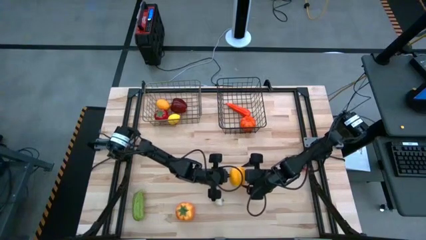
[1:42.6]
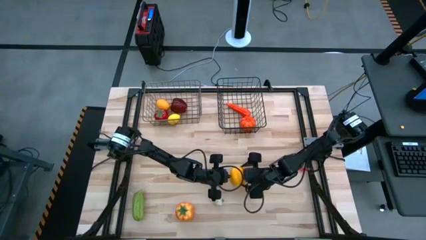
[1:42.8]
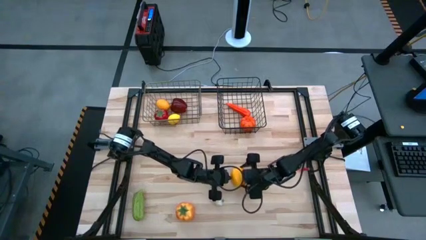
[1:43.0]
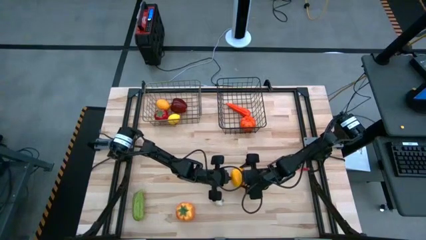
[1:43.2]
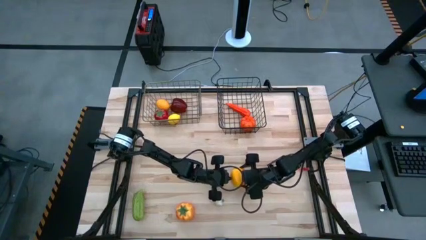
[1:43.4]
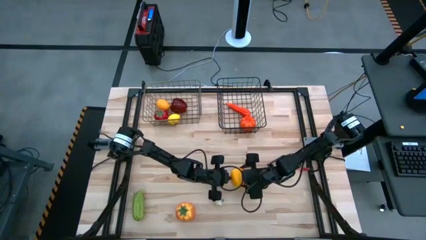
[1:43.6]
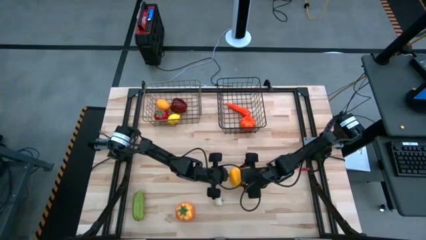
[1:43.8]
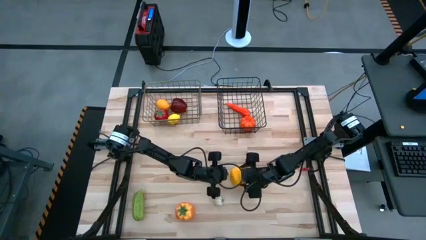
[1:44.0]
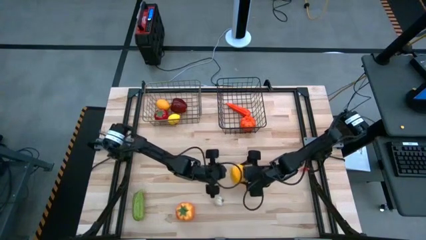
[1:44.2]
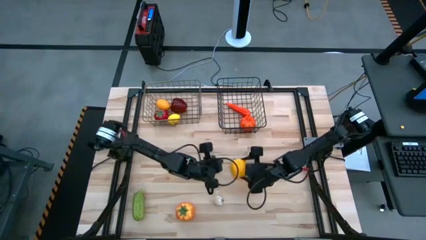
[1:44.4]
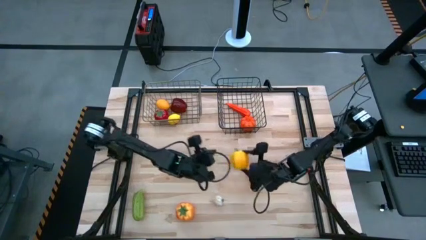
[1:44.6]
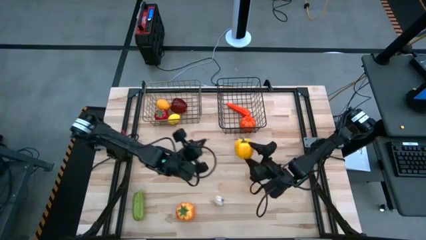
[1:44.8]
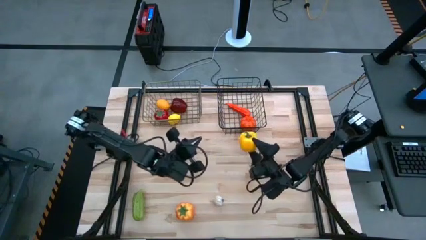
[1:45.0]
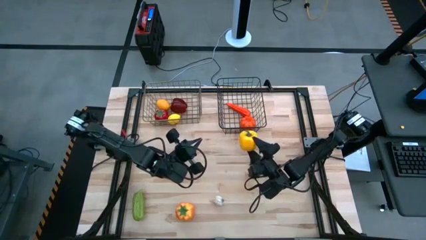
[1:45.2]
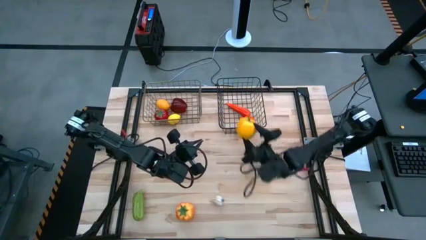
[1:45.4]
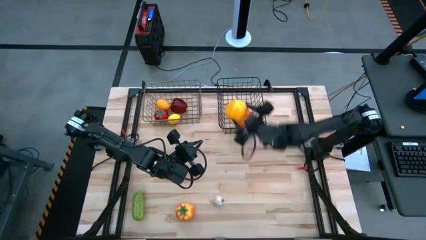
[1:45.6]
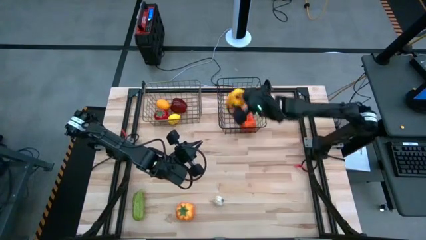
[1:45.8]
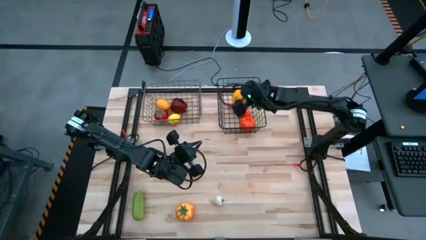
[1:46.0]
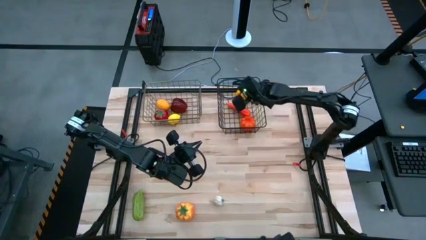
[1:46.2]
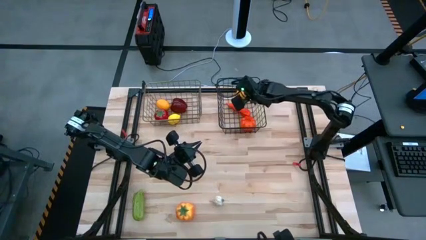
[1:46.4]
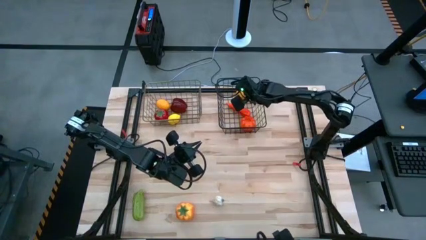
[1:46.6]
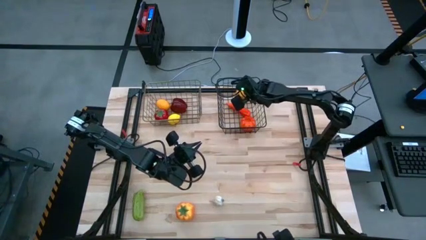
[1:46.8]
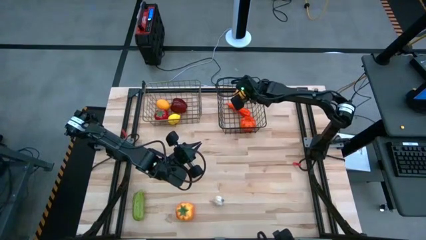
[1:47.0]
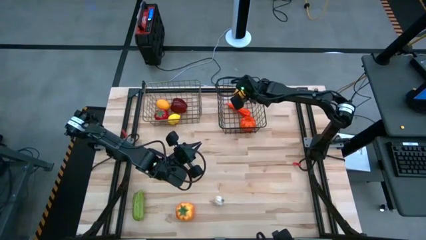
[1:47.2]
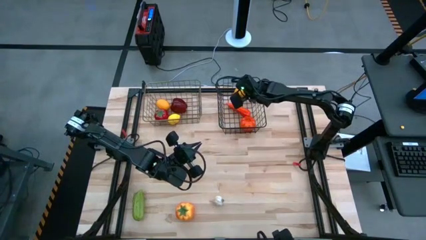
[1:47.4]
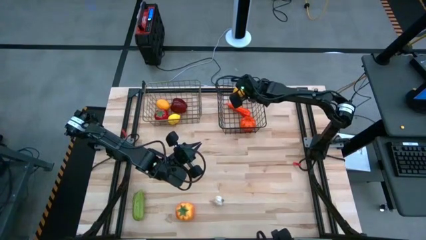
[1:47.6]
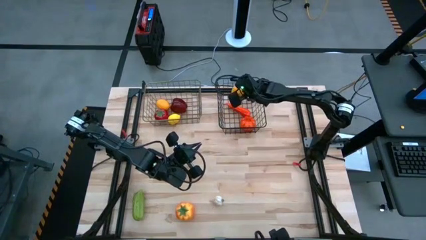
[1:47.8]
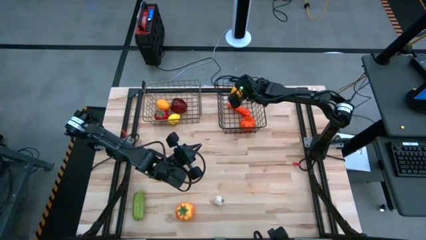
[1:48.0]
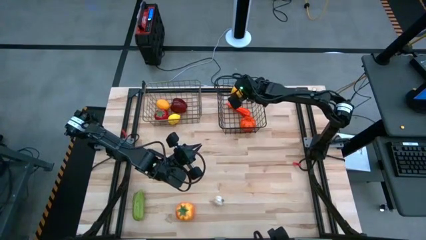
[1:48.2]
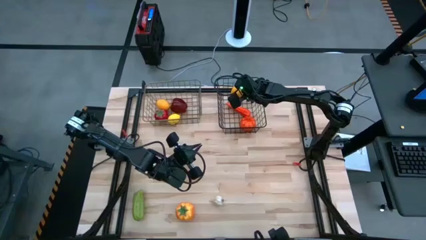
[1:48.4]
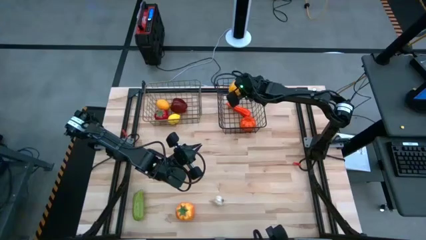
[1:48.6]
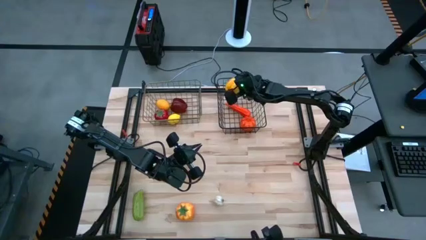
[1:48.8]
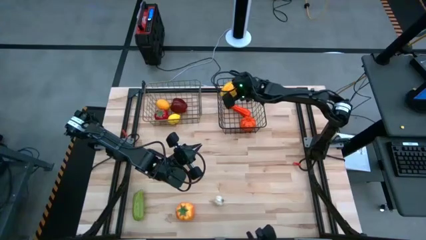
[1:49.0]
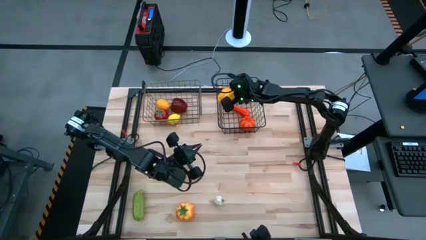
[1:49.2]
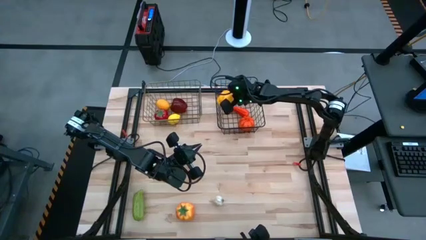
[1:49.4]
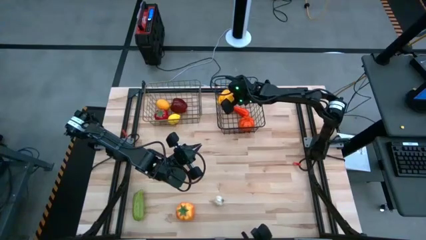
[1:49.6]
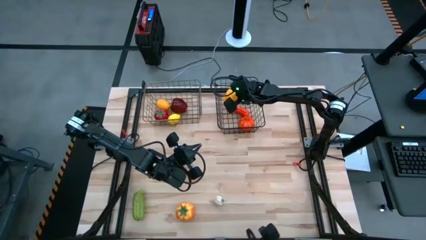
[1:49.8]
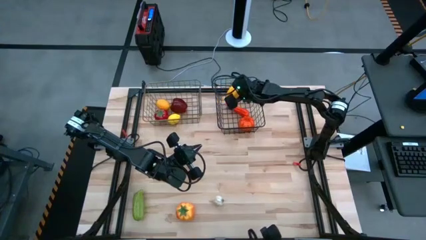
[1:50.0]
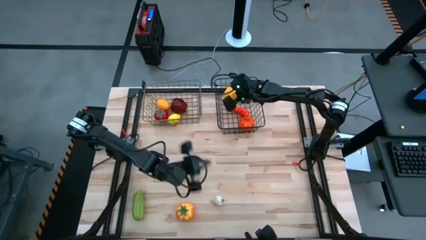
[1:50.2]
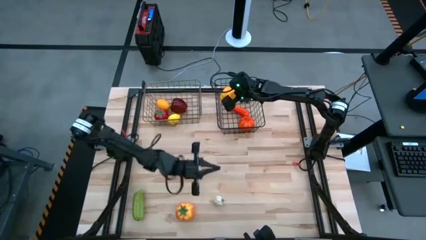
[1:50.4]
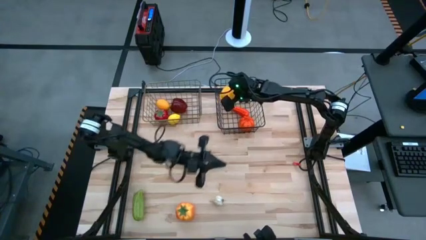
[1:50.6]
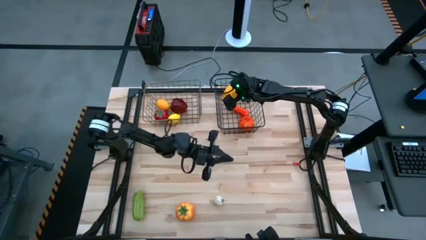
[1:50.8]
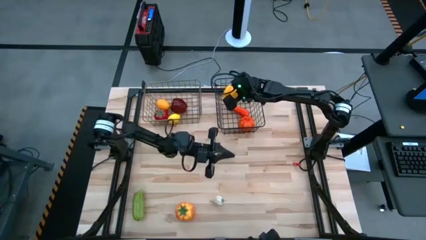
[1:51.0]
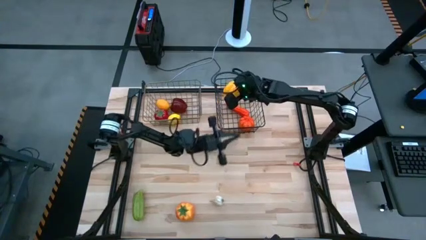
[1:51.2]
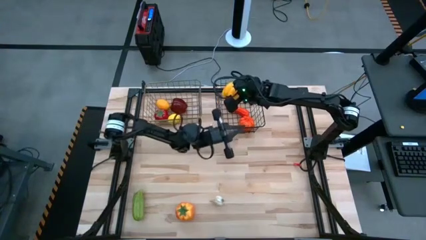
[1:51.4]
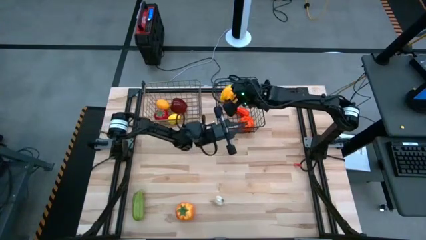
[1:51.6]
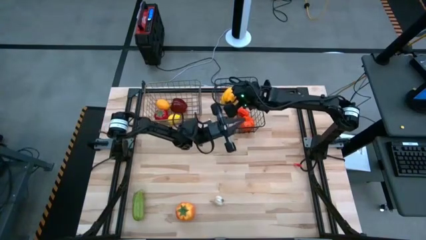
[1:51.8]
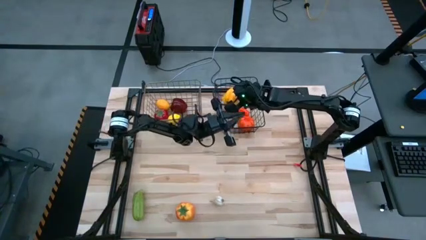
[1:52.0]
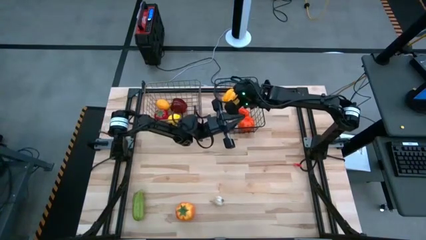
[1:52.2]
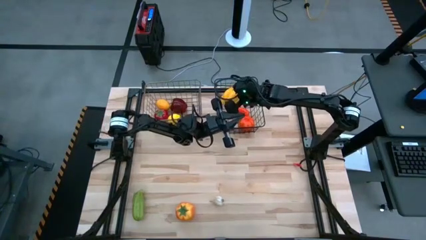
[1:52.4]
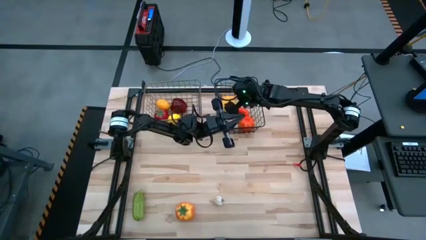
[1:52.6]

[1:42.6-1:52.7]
Task: Sort produce into baskets
Put the bell pepper into the black wire basket

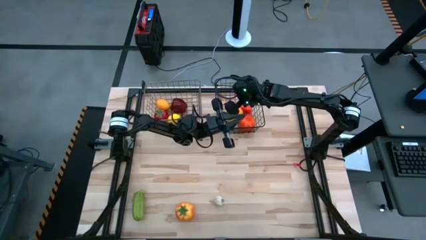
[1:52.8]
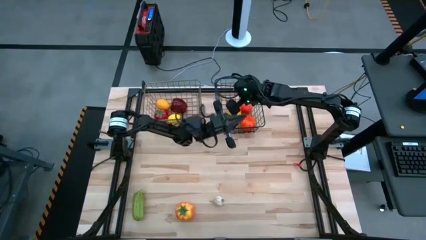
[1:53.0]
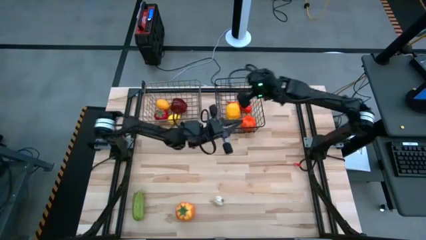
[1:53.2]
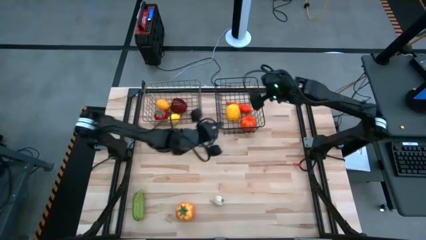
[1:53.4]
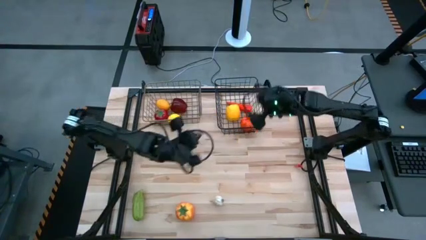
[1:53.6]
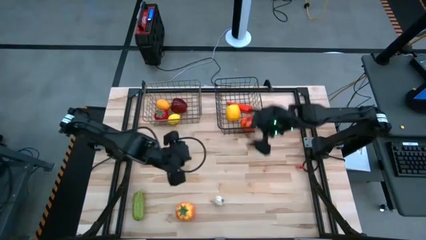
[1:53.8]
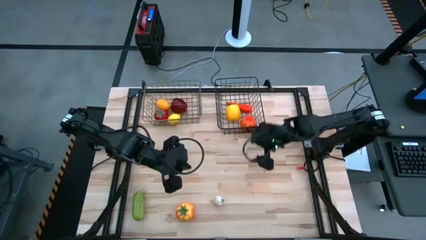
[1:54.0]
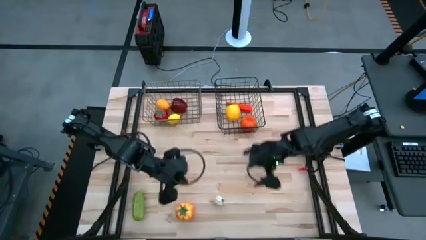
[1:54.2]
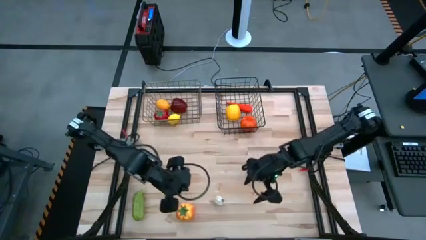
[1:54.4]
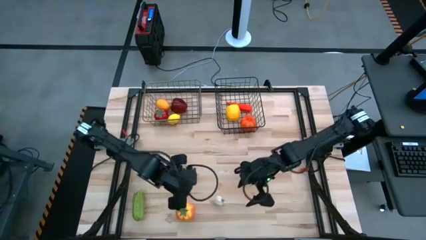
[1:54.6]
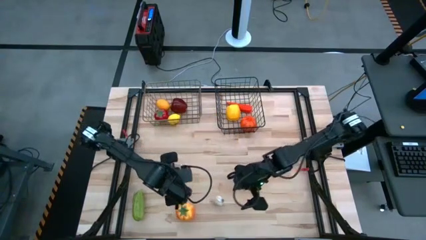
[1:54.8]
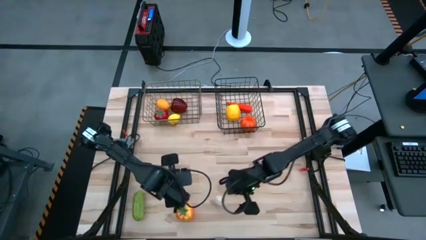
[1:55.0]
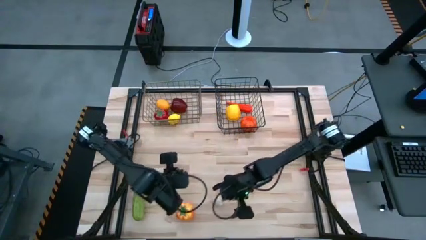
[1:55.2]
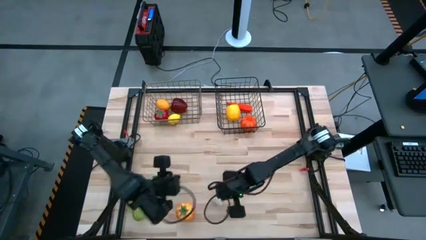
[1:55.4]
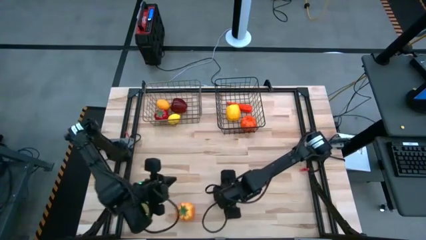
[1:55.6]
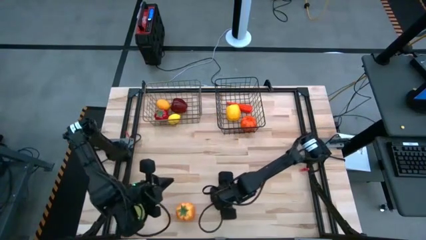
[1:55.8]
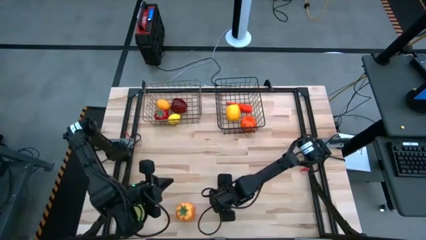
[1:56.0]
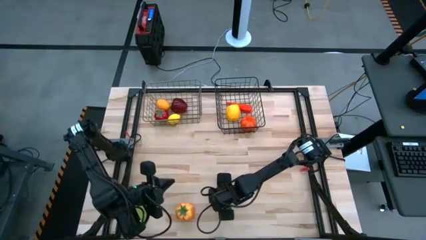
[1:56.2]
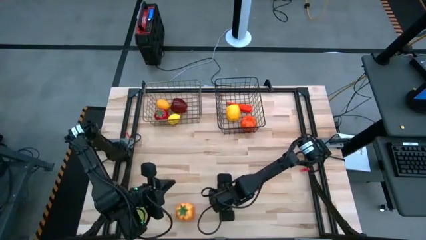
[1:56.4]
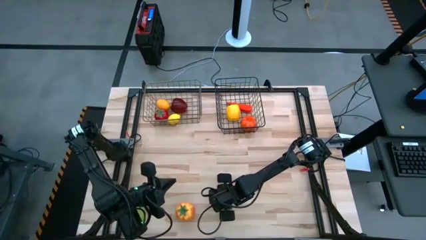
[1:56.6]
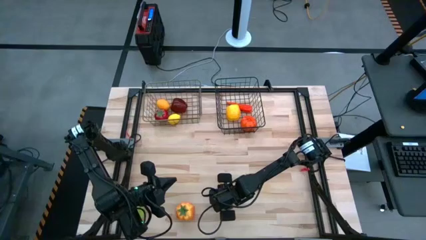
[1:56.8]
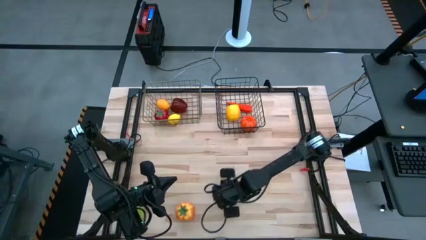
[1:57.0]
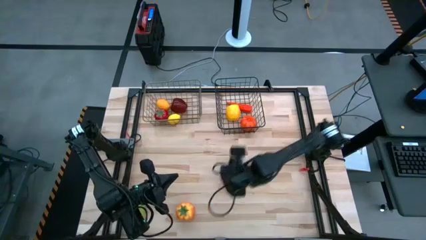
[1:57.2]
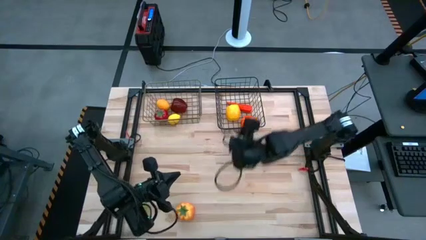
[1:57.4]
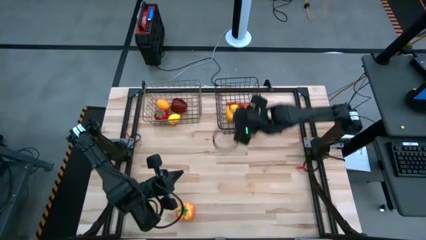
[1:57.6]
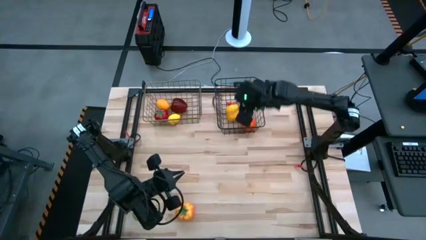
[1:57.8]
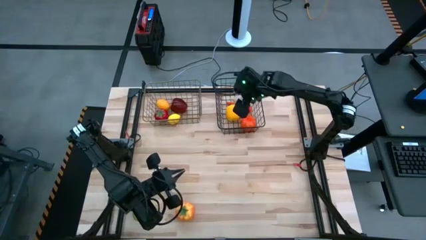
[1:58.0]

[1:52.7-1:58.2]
Put the garlic into the black wire basket
